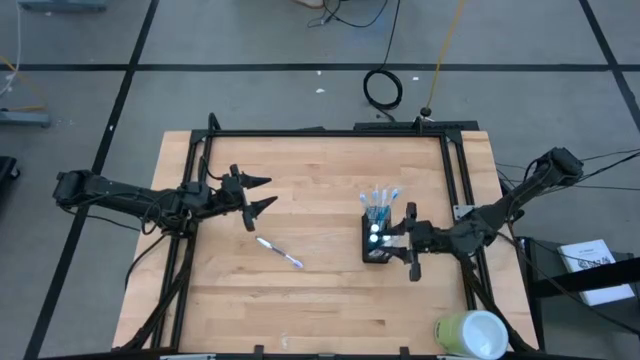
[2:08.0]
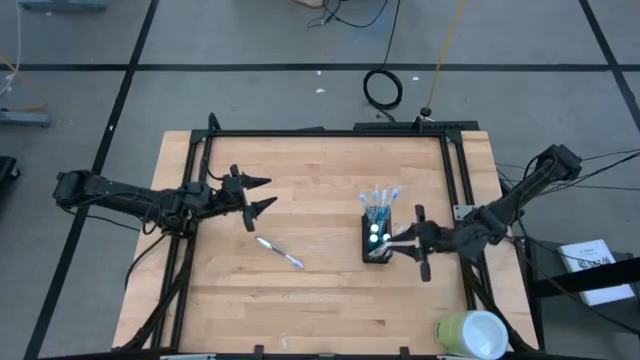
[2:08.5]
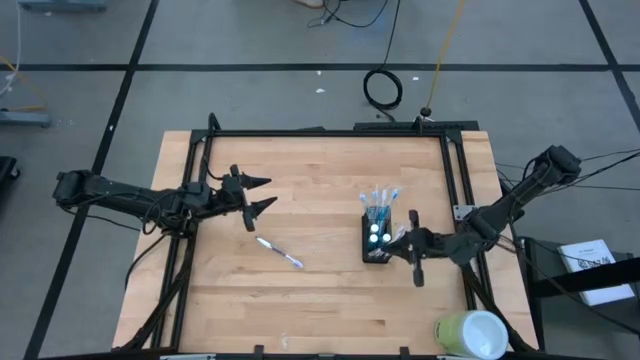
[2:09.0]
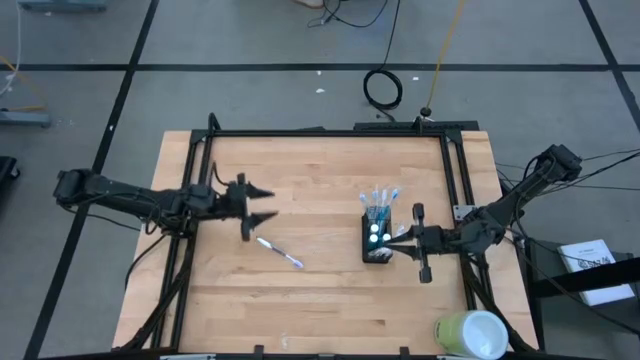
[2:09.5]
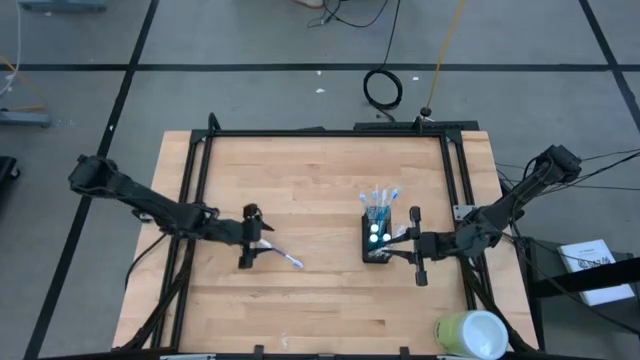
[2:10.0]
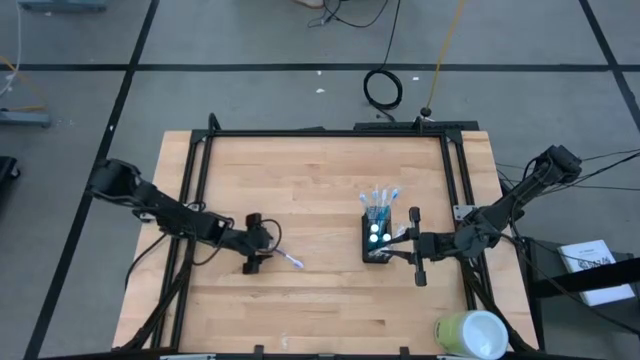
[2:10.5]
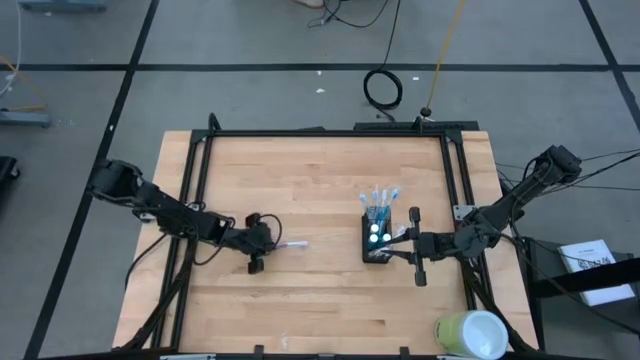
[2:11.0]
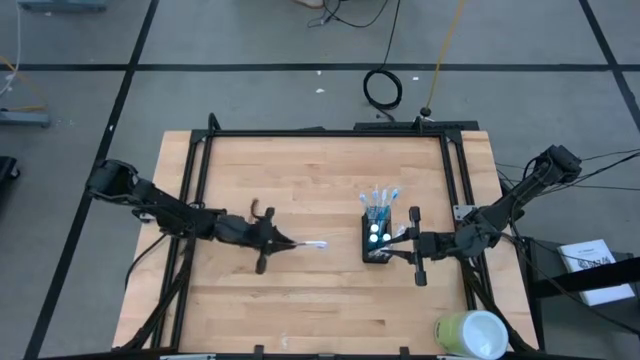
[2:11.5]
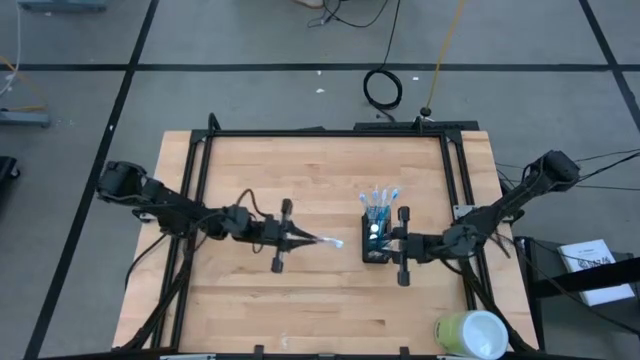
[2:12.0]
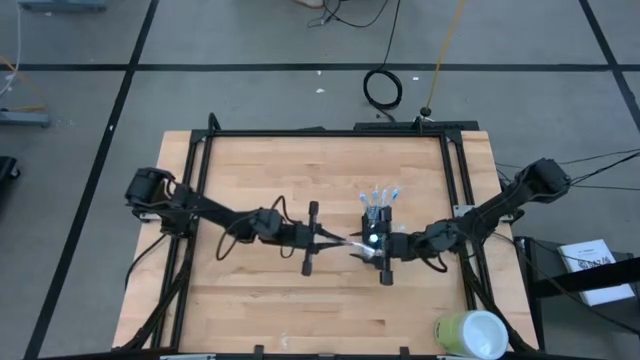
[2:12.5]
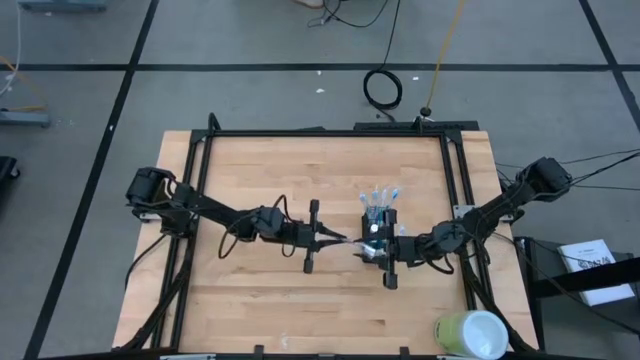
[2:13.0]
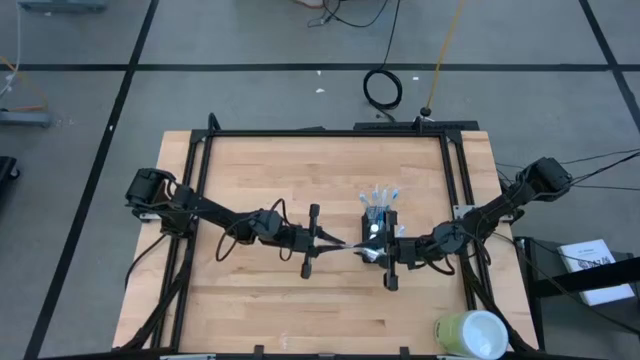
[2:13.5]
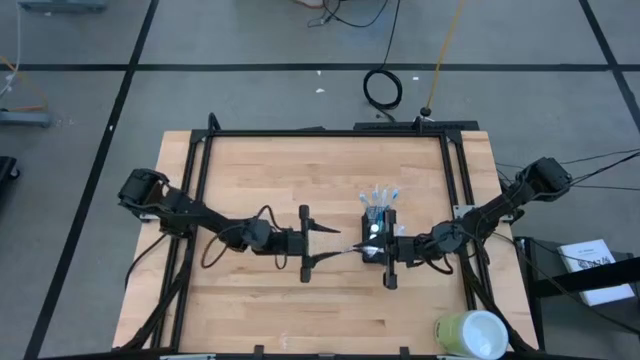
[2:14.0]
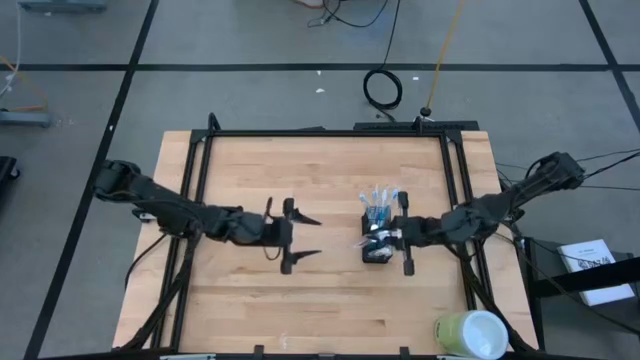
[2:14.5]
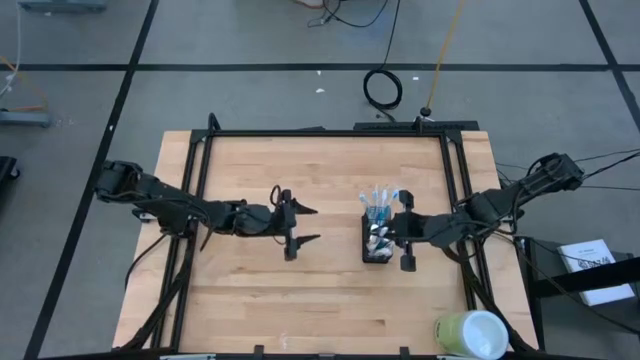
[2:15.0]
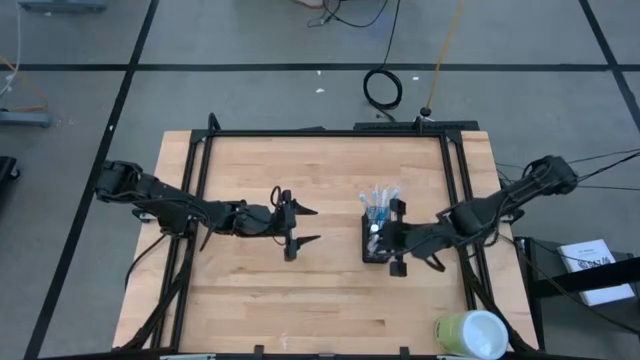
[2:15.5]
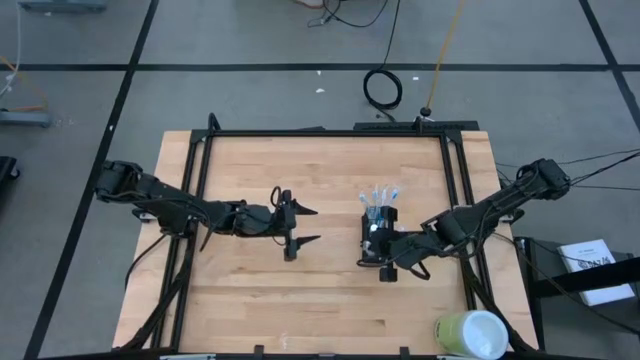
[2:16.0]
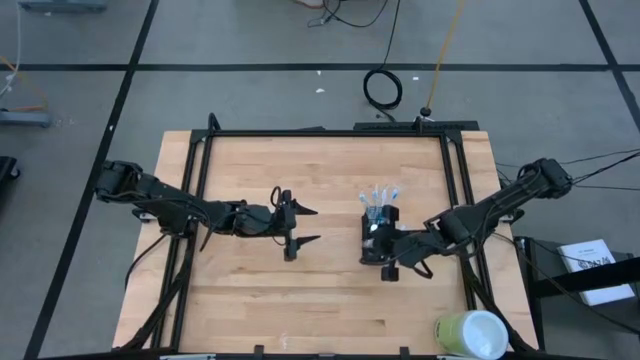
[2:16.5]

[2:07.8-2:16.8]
Task: Pick & Place toothbrushing station
Put the purple toothbrush into the black organizer

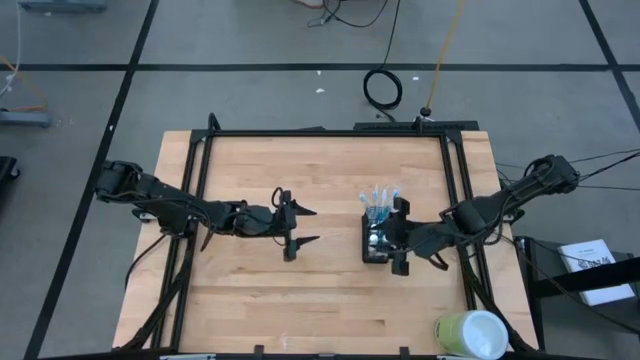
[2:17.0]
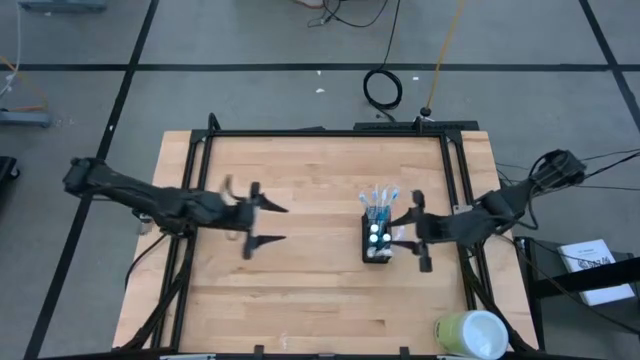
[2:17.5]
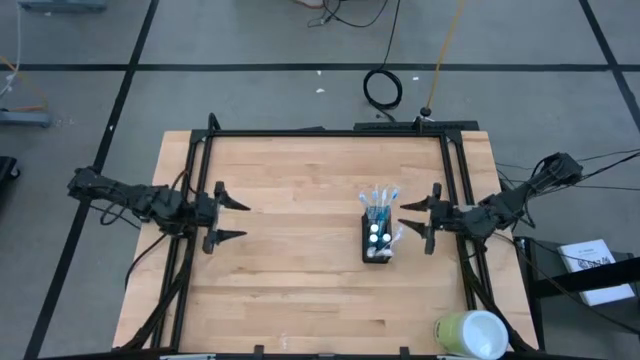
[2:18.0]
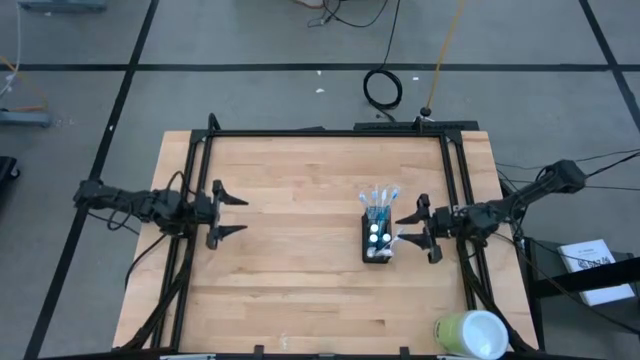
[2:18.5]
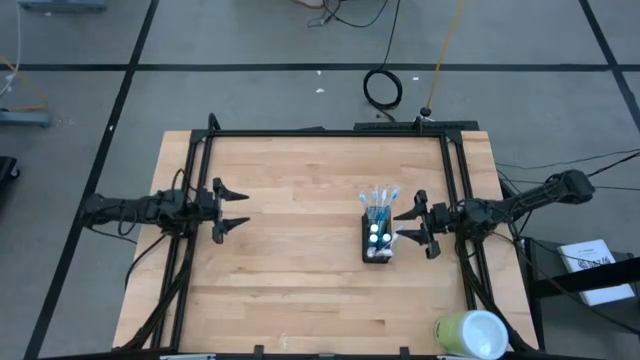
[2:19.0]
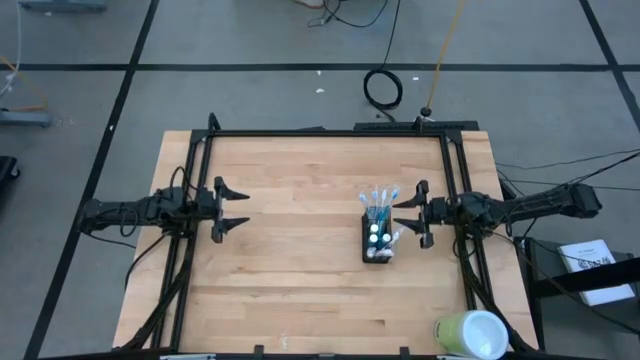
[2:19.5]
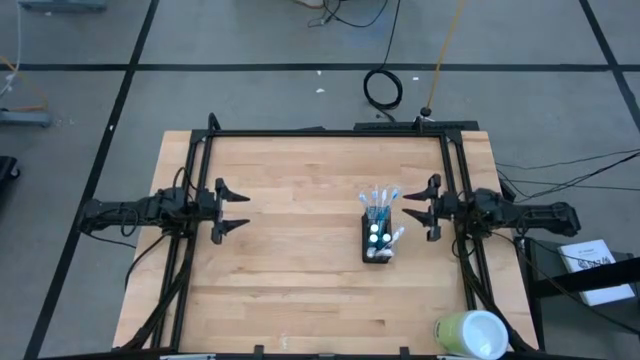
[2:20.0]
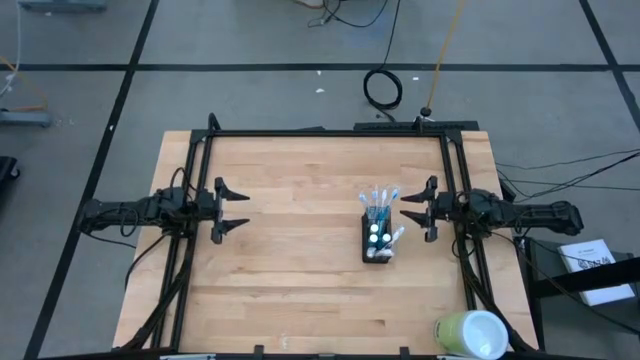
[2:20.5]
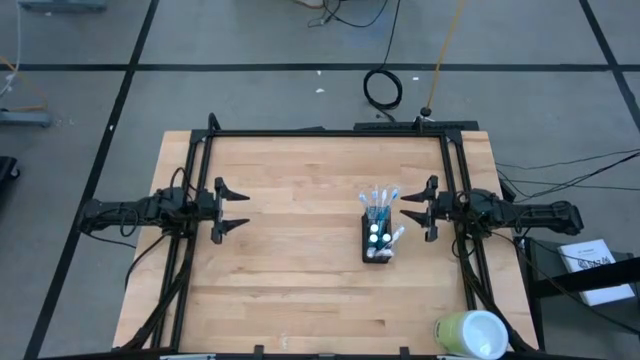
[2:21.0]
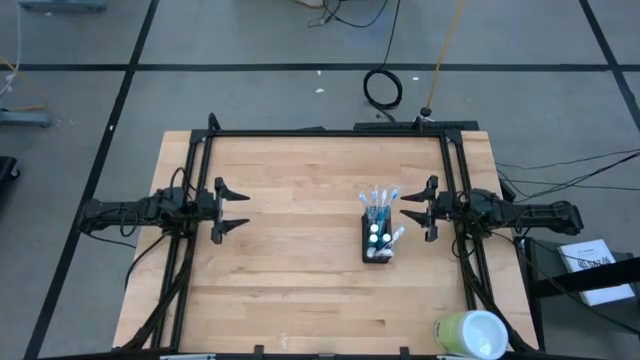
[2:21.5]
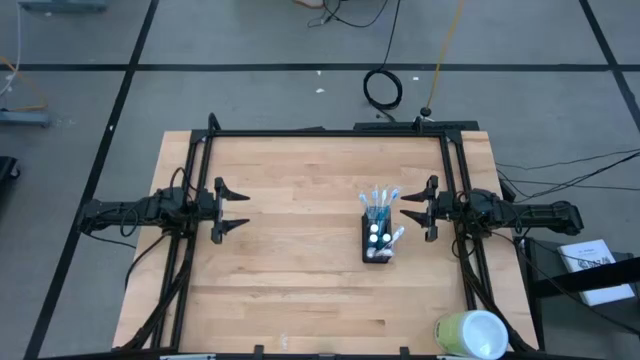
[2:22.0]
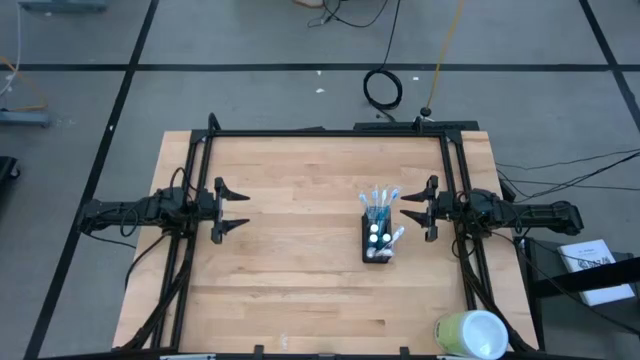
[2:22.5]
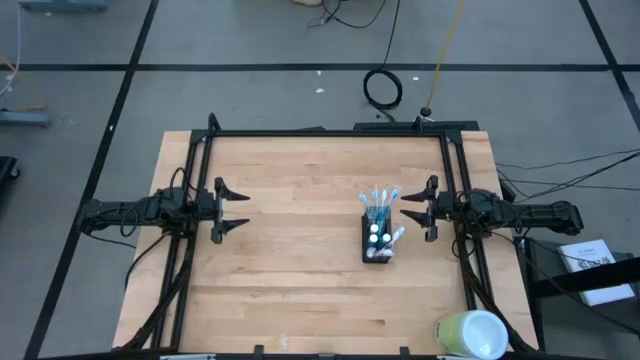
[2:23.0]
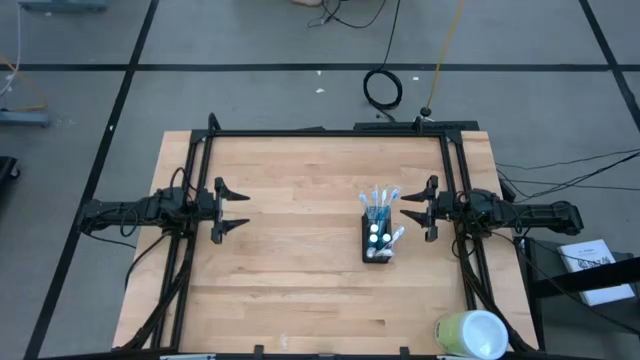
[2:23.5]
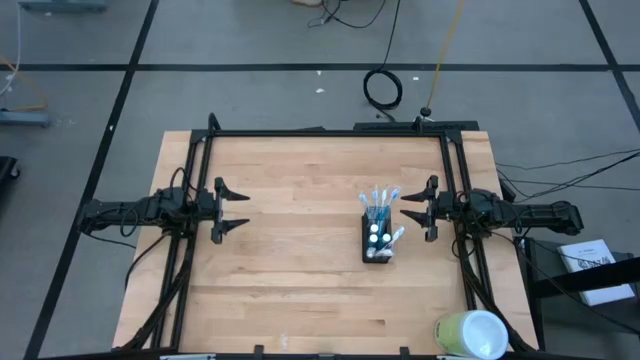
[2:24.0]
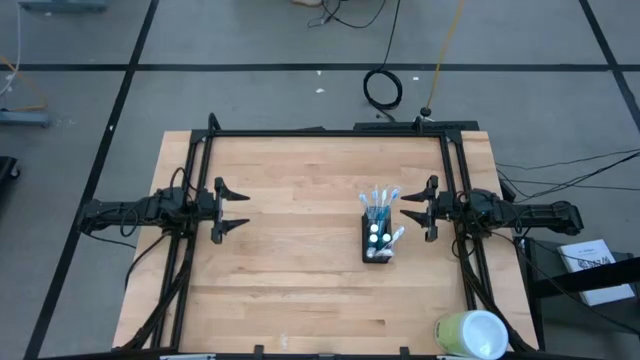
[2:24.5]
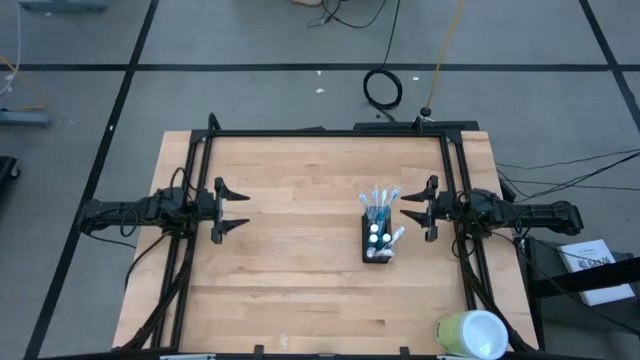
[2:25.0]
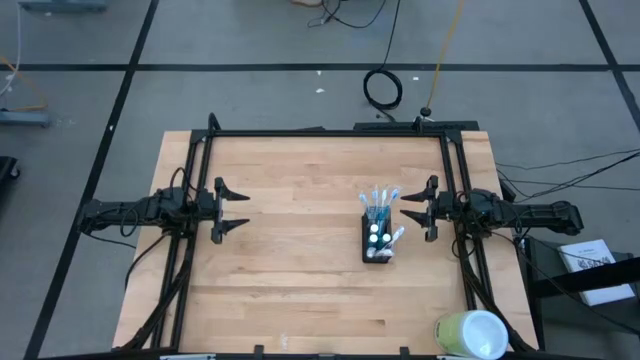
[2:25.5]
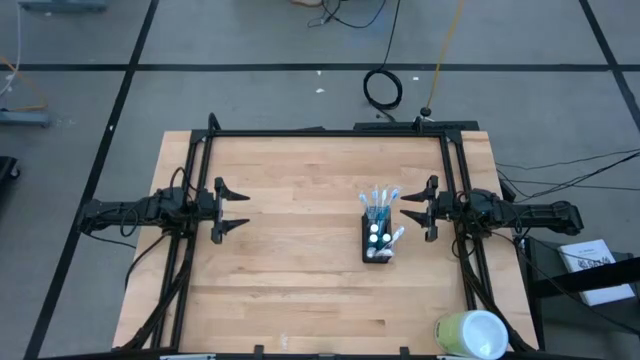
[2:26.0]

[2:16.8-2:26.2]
Return to Home Position

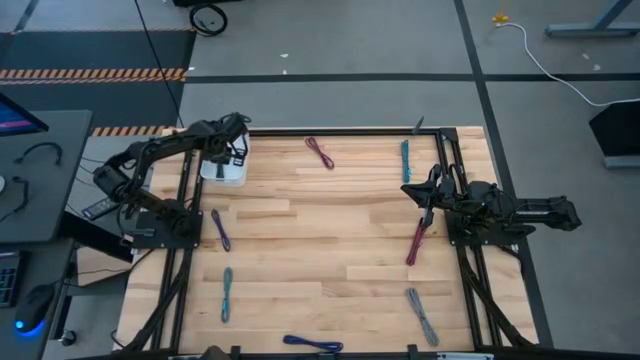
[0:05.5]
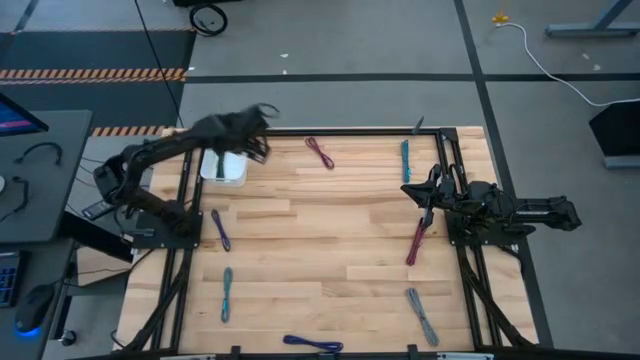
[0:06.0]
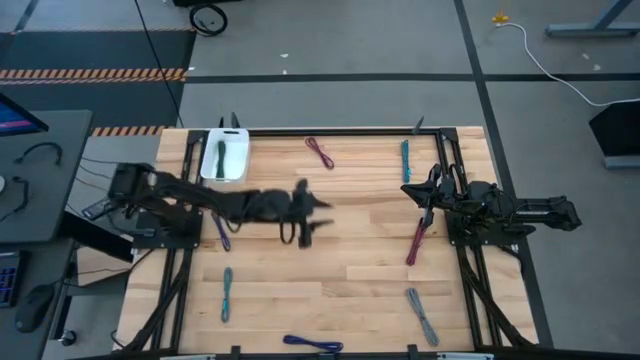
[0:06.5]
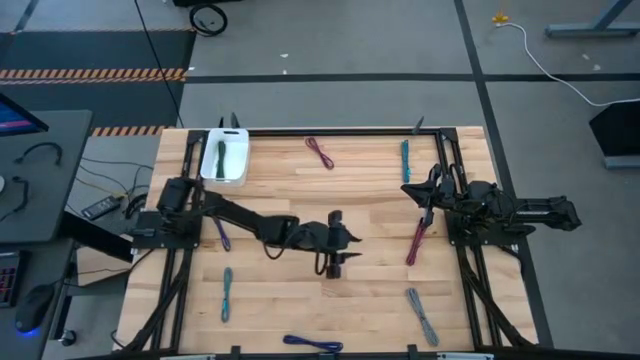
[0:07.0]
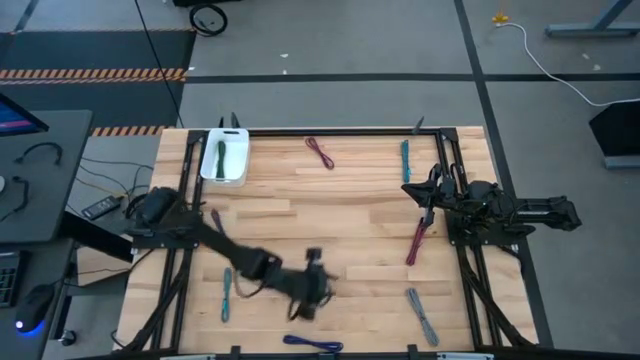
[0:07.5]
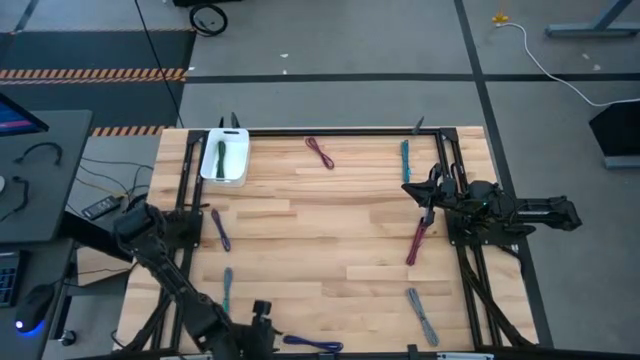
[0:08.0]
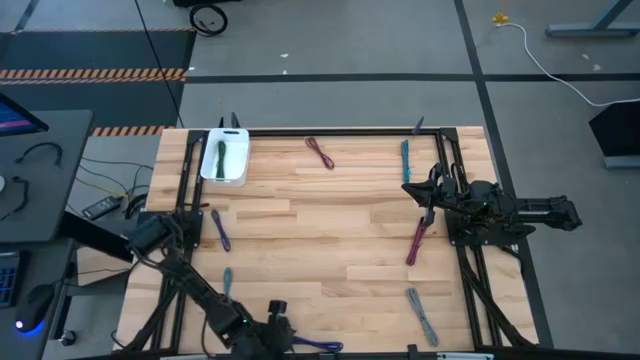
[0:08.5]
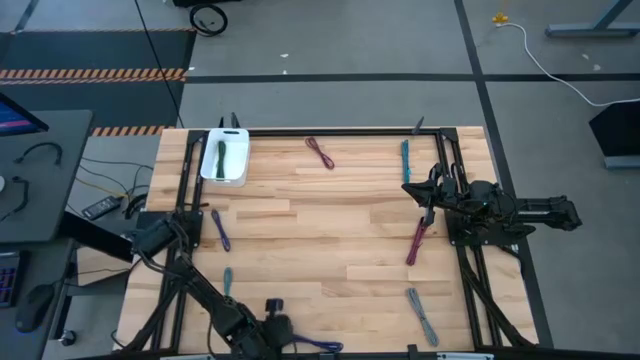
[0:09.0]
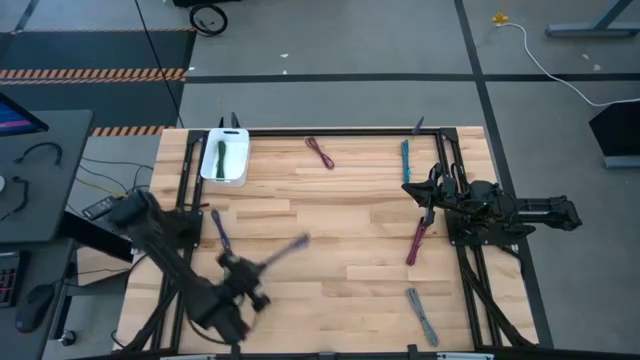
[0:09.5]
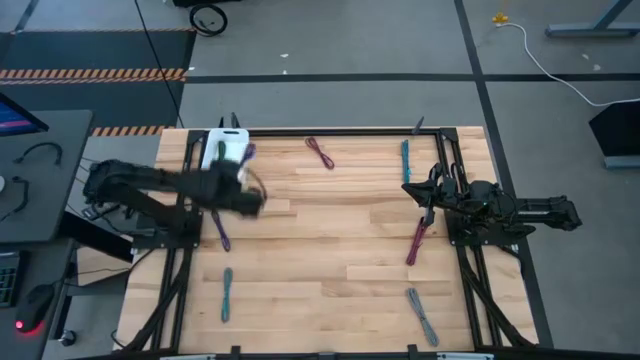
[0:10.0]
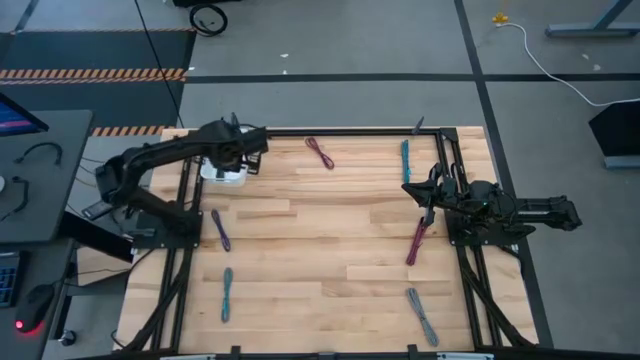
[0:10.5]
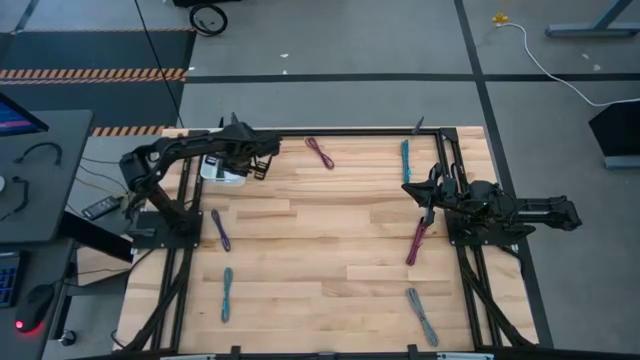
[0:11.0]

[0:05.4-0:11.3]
Task: Pick and place USB-C Cables
Put the bottom purple charger cable into the white bin
